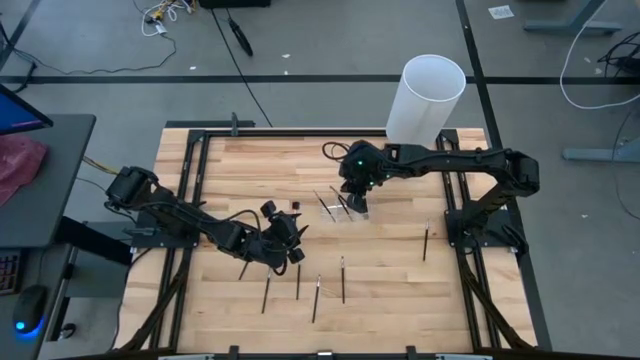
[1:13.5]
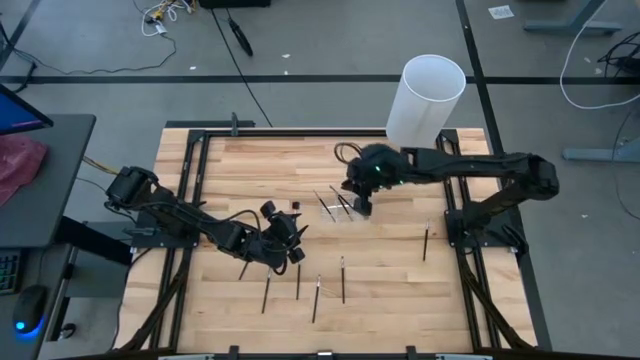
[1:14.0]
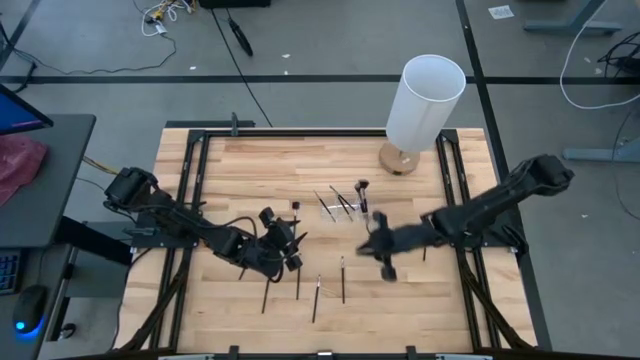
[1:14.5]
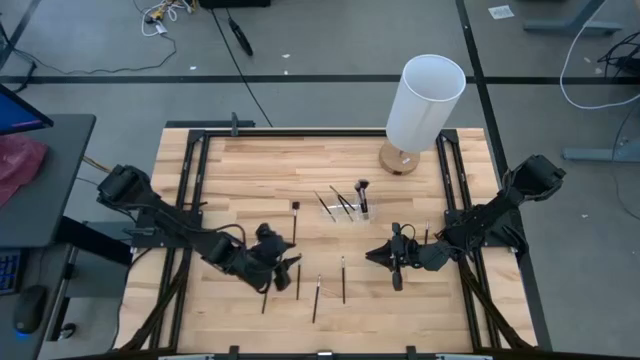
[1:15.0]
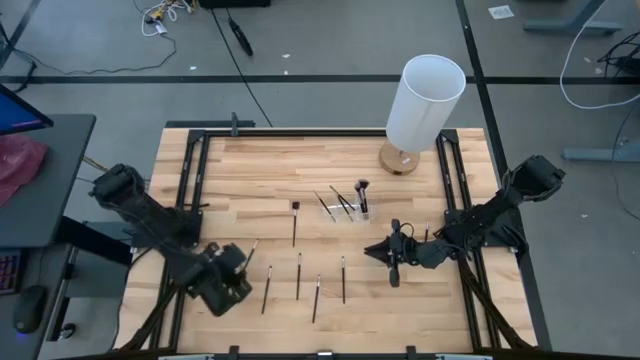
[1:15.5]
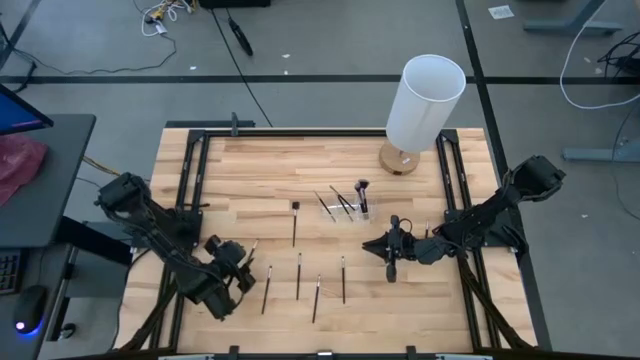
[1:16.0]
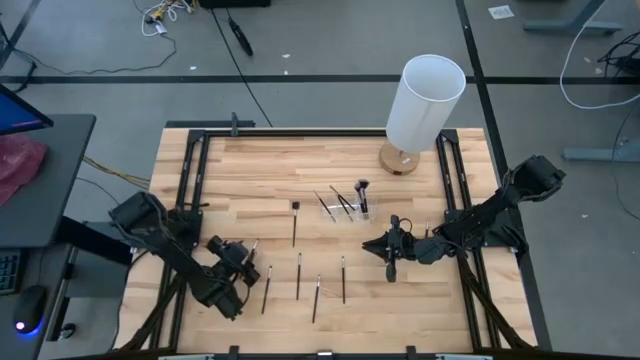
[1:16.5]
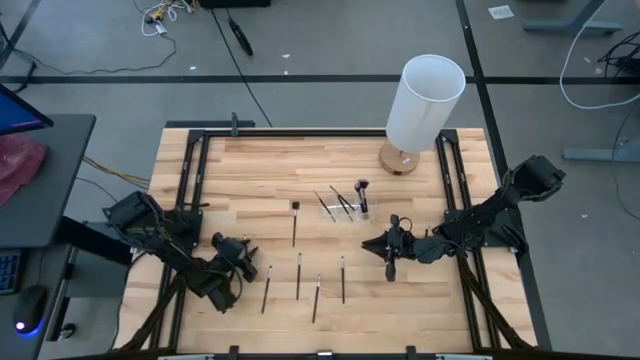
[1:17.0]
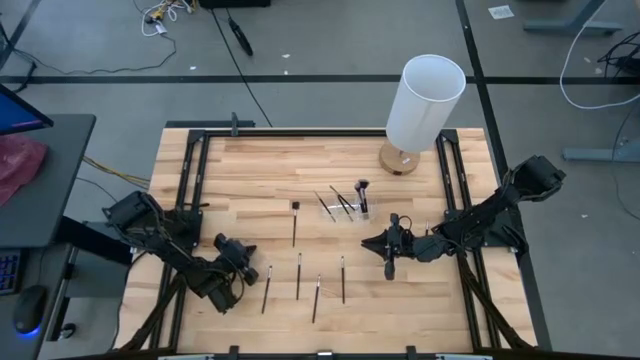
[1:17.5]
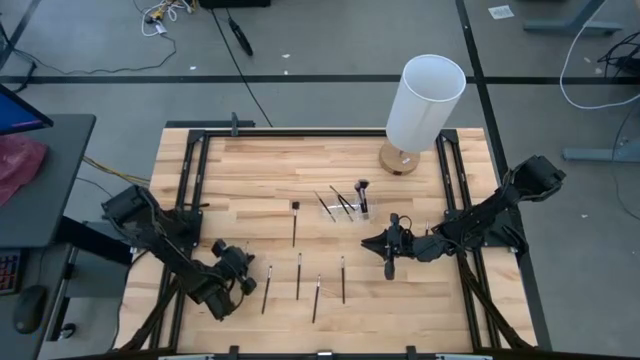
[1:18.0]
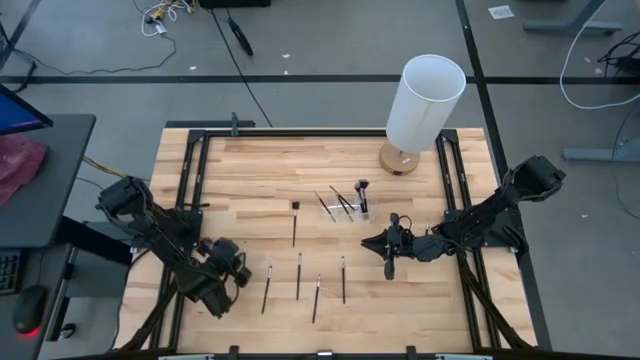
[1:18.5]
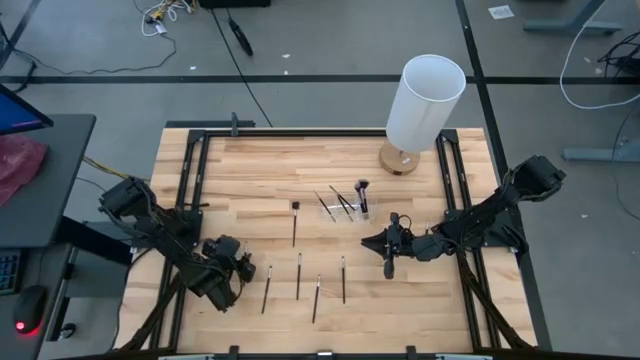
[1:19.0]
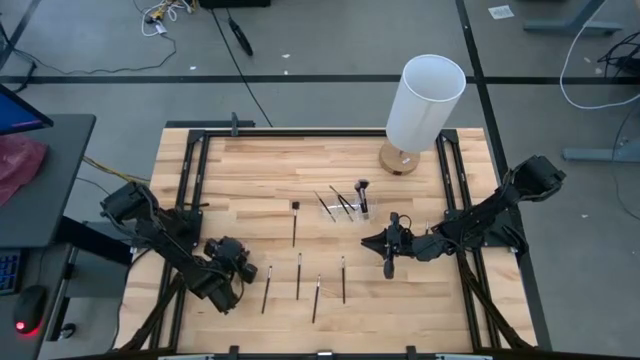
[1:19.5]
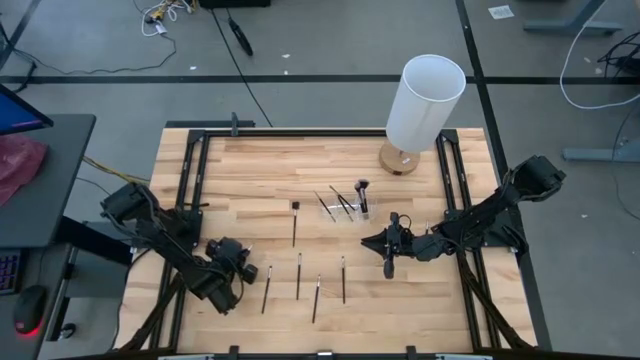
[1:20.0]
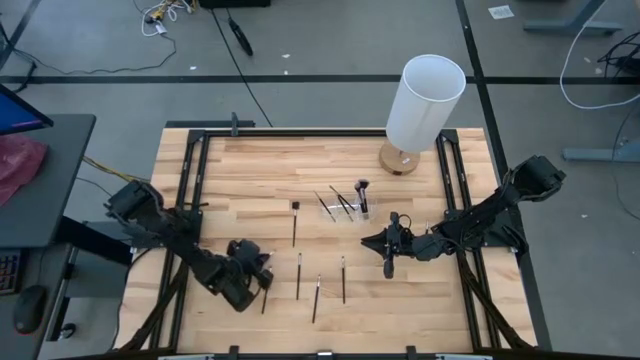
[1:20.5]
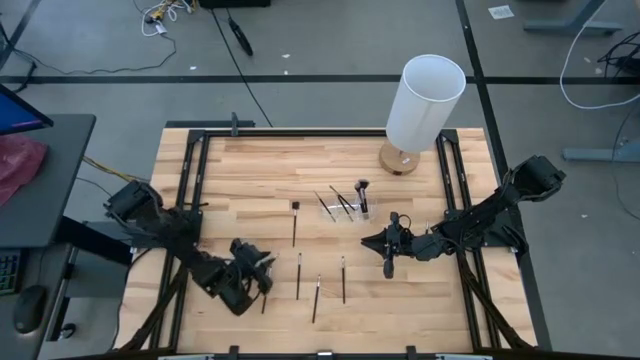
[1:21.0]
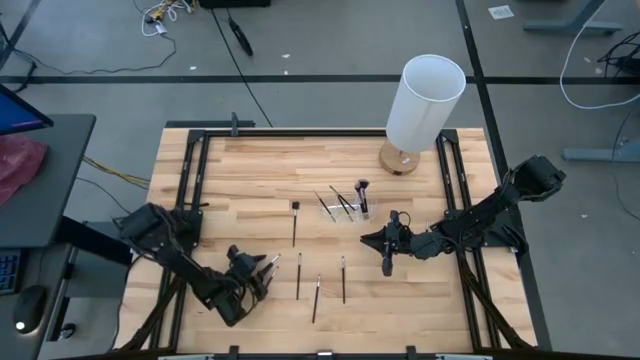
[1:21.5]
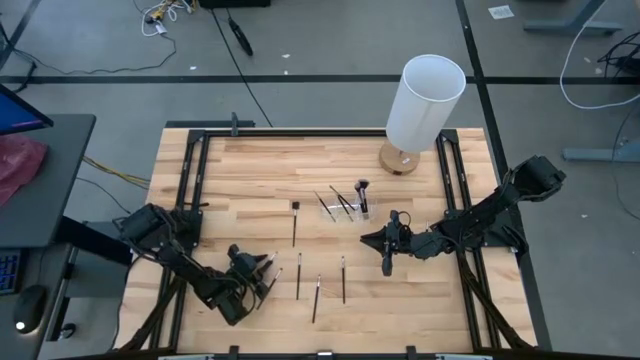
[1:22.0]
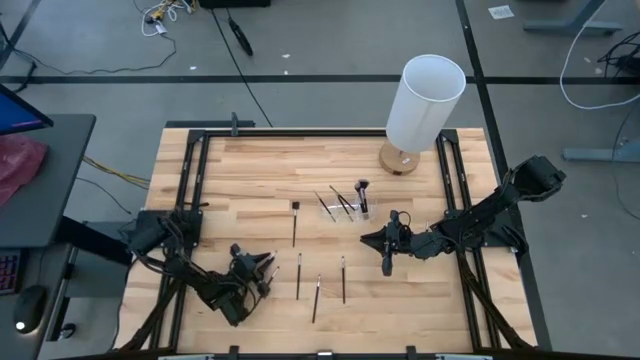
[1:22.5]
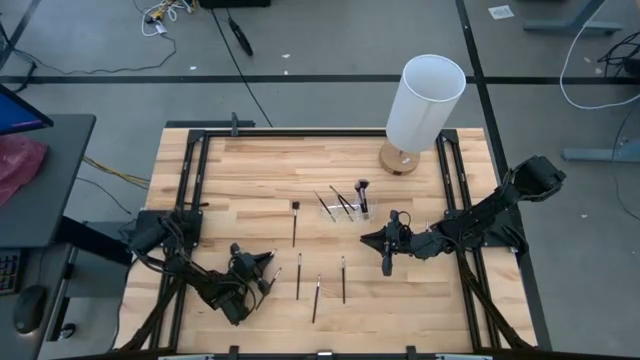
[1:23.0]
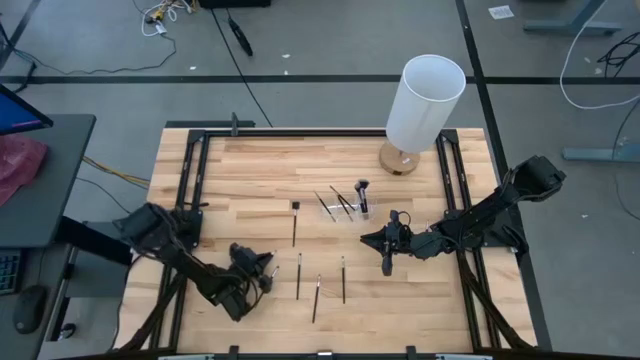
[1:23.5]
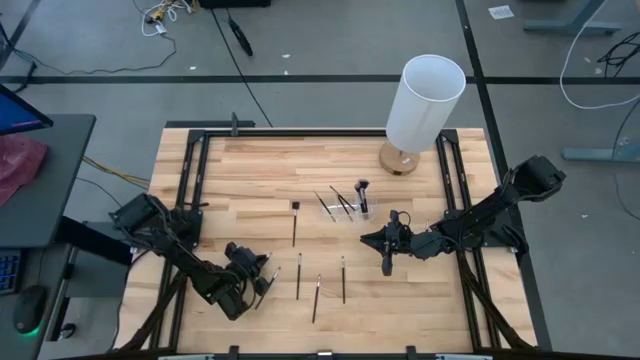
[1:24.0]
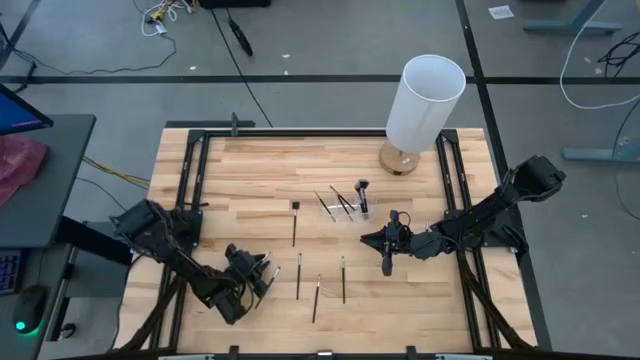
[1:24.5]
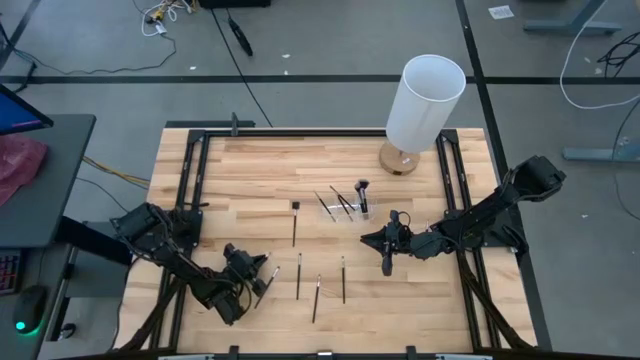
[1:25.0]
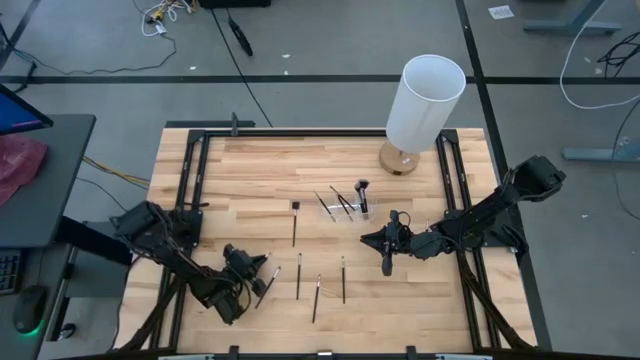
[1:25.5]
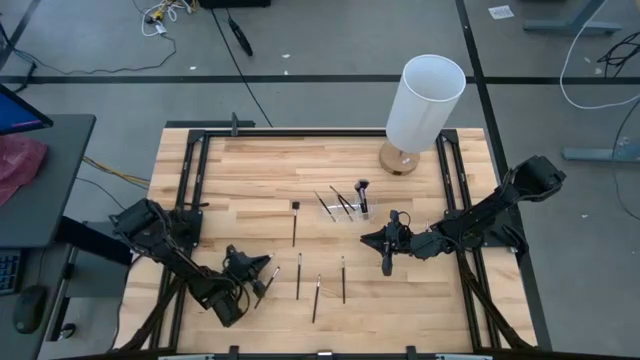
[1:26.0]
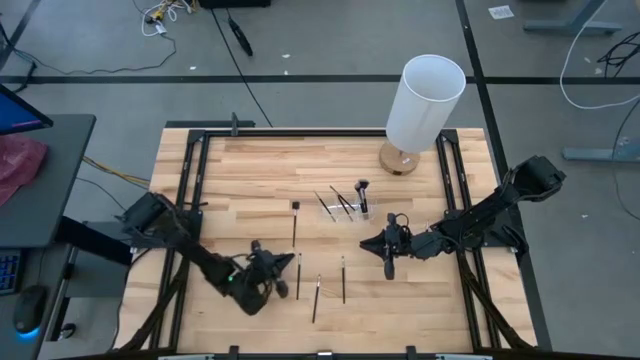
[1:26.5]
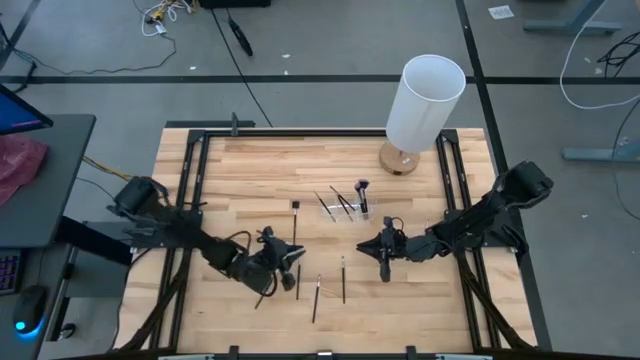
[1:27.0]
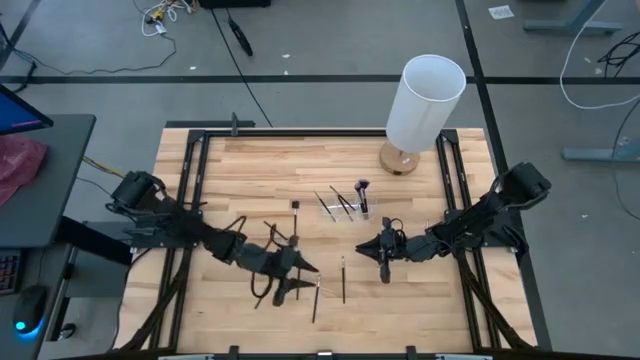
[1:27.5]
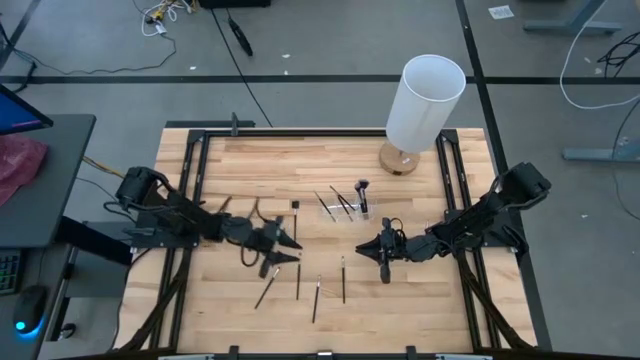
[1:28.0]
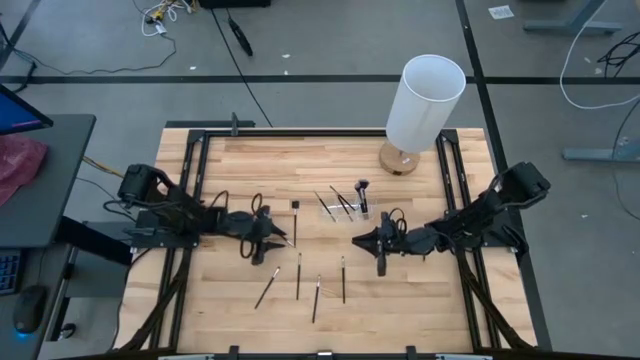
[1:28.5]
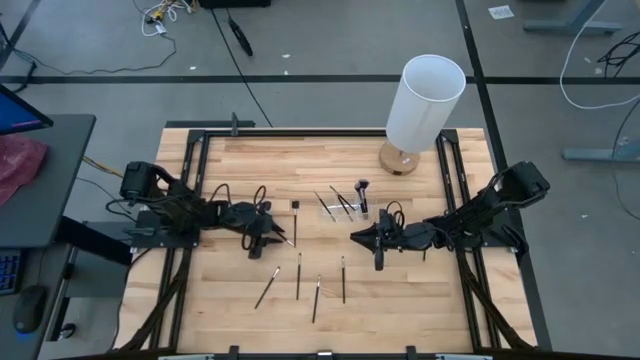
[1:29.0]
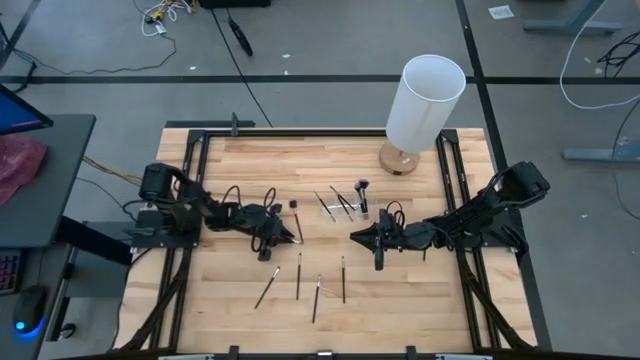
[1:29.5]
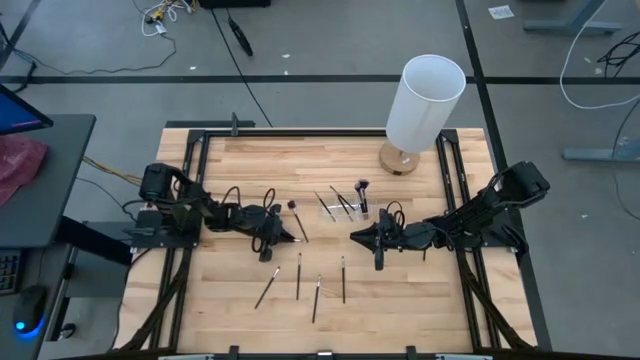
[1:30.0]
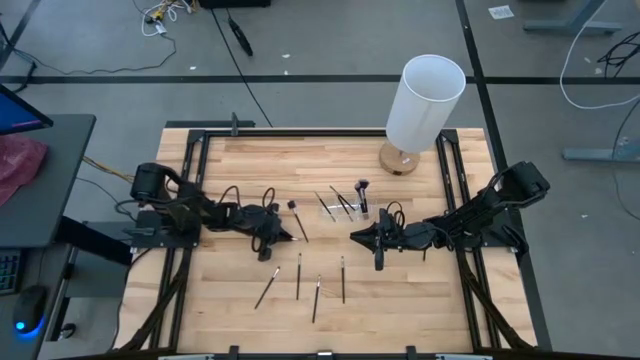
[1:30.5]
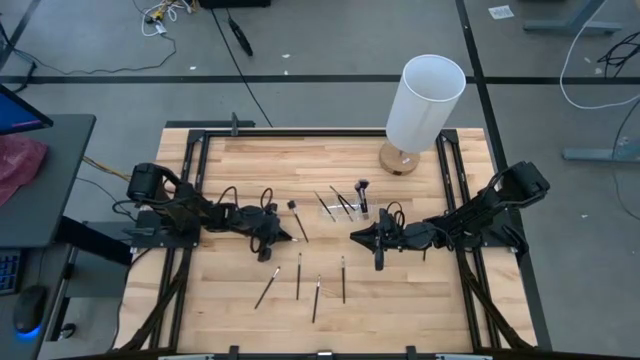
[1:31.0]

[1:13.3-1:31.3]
Task: Pick & Place Makeup Supplies
Put the black makeup brush into the transparent organizer

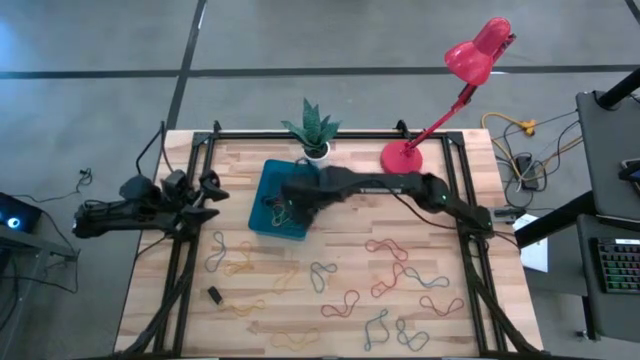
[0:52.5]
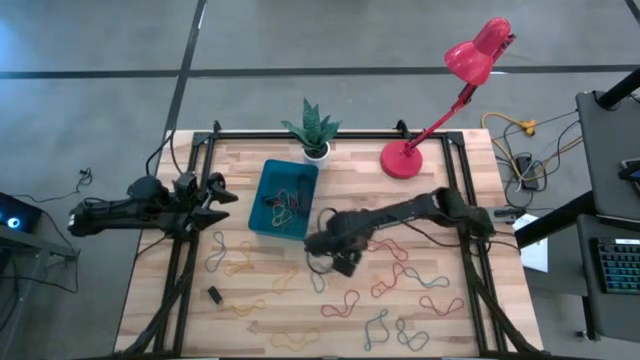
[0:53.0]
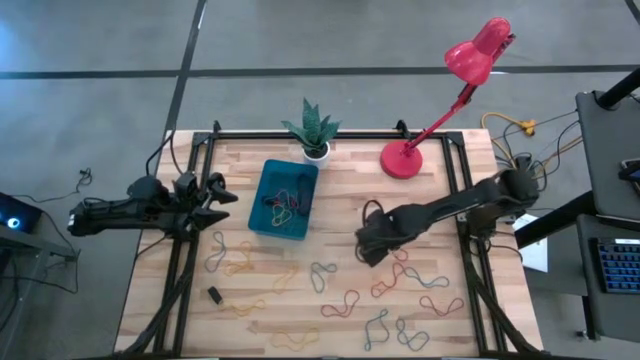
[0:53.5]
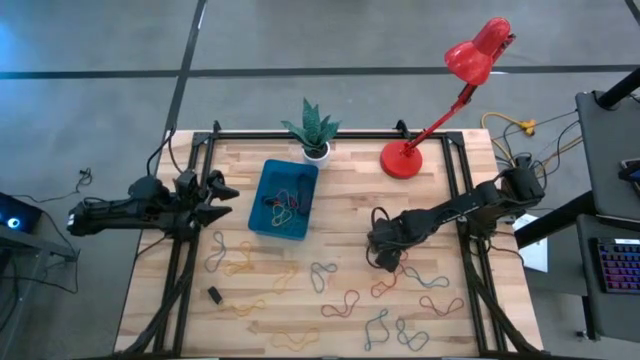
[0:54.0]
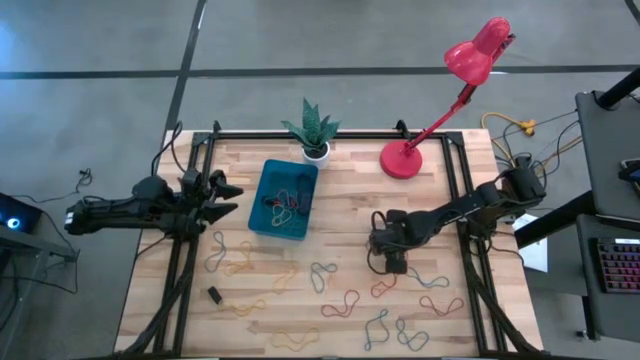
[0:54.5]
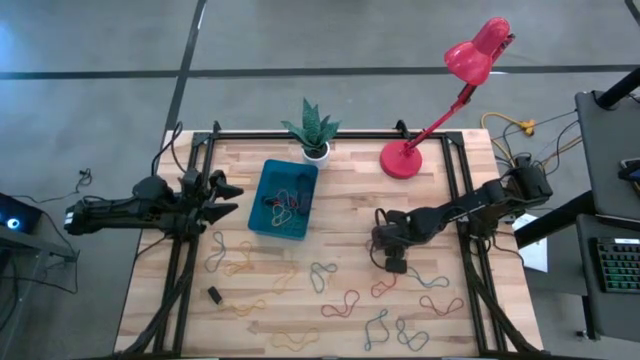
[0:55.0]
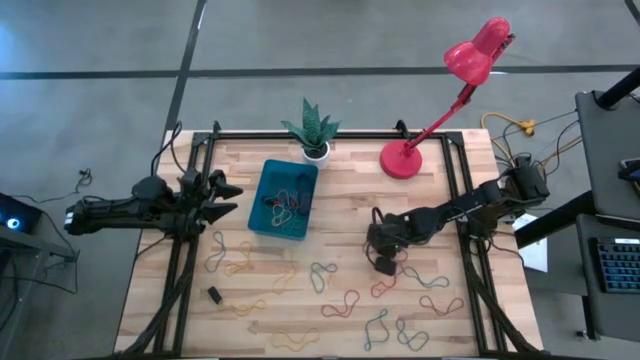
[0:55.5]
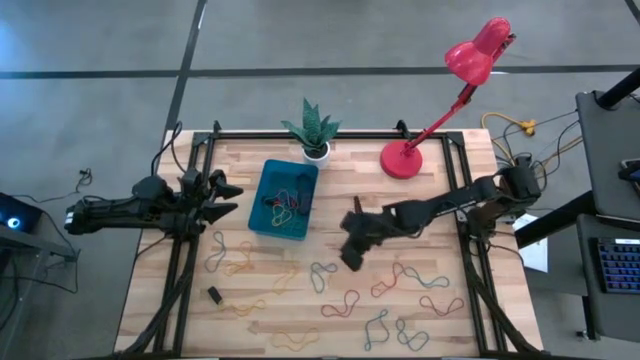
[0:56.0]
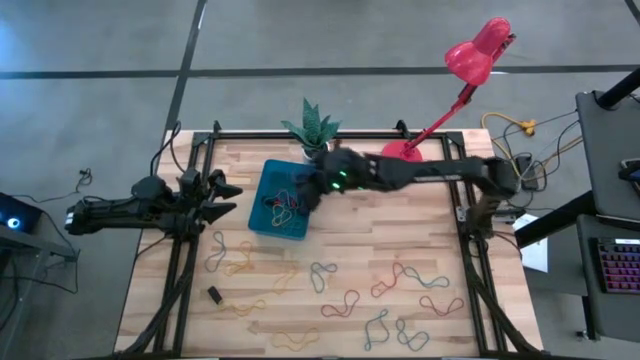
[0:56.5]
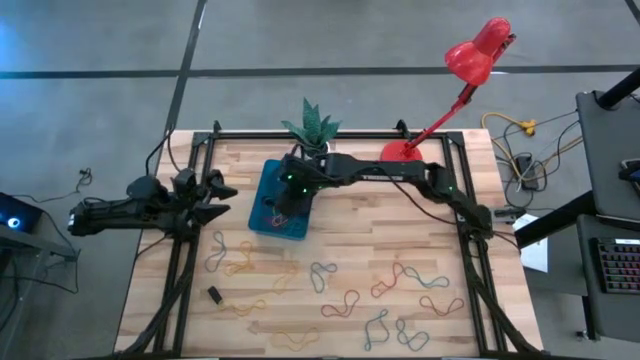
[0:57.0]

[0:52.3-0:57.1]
Task: Pick and place rubber bands into bin
Put the orange rubber band into the blue bin
